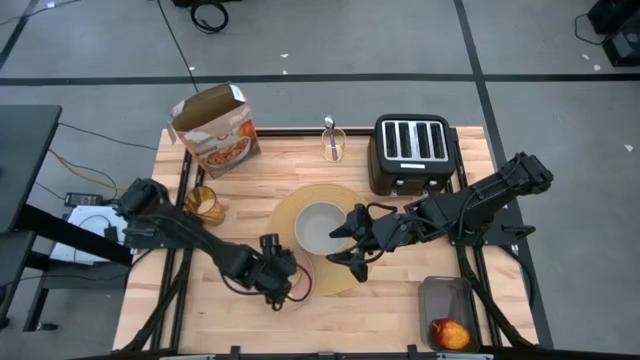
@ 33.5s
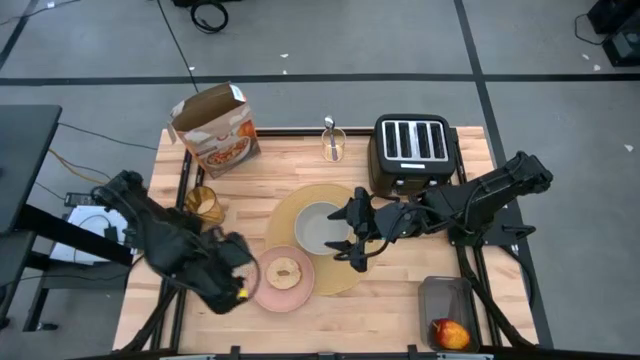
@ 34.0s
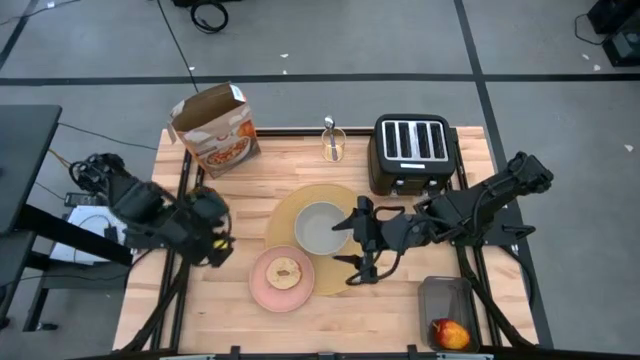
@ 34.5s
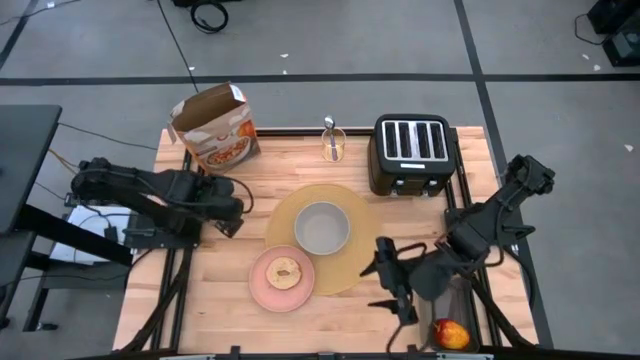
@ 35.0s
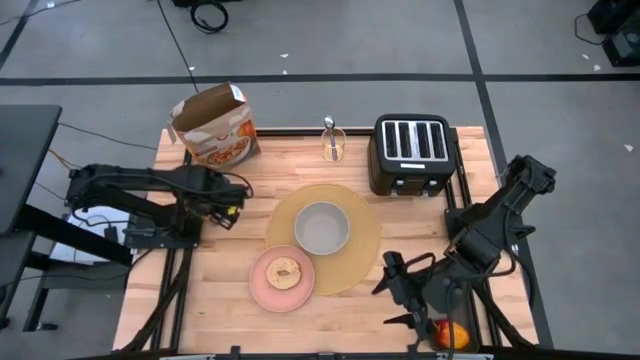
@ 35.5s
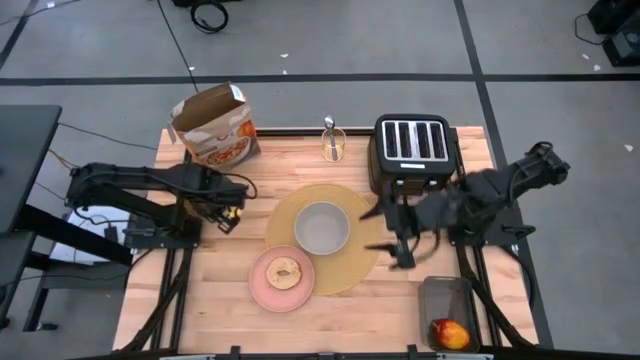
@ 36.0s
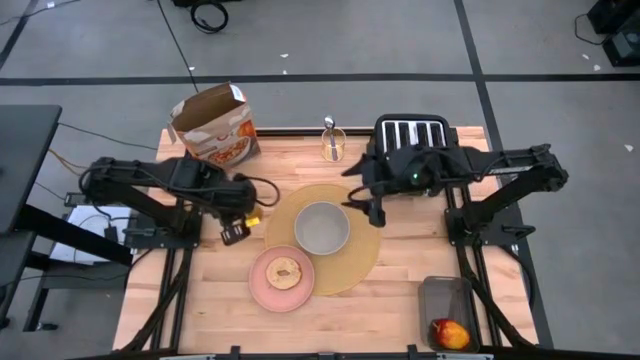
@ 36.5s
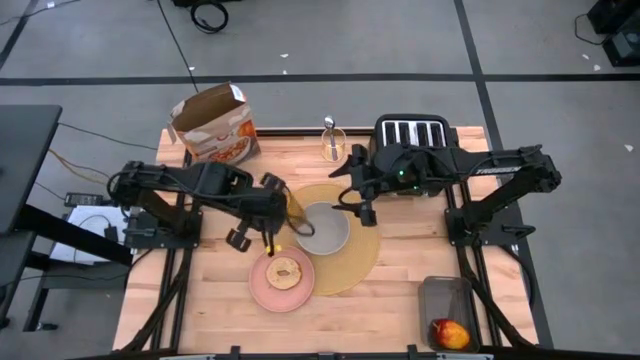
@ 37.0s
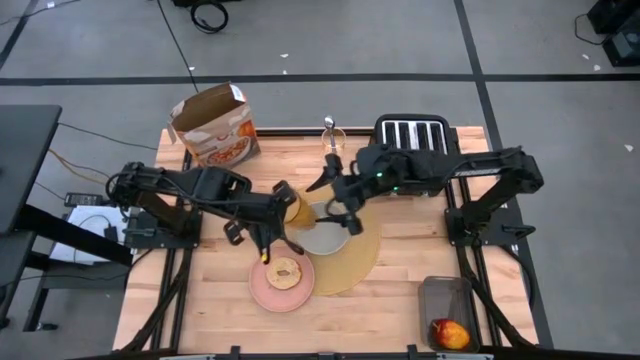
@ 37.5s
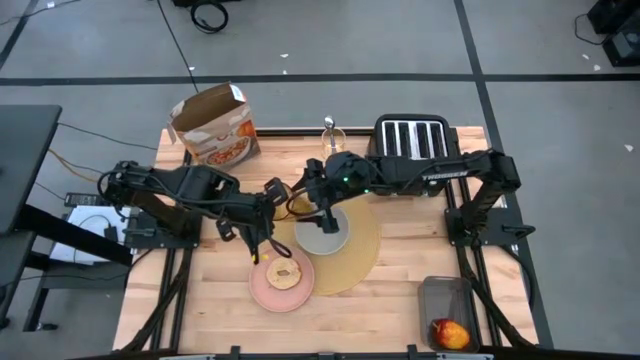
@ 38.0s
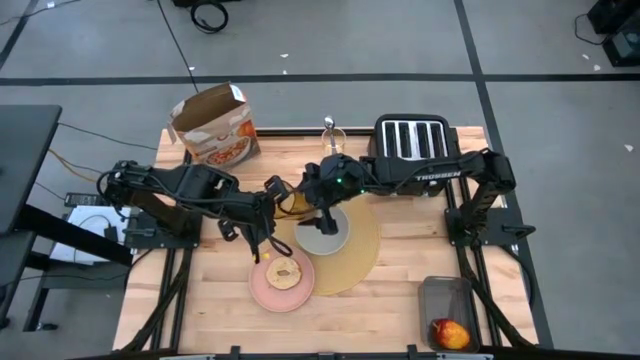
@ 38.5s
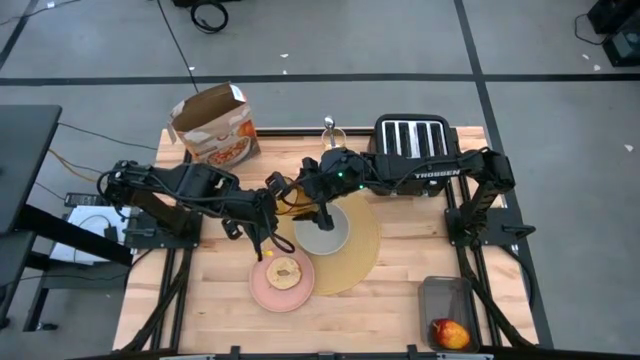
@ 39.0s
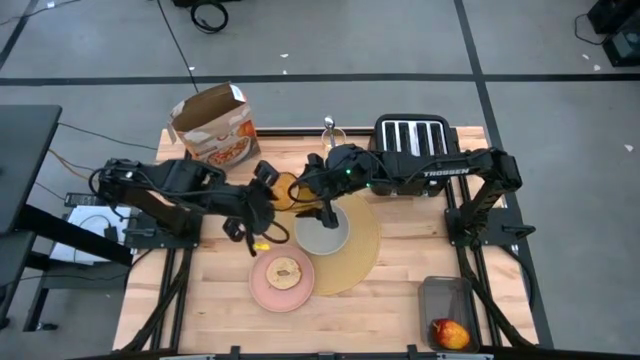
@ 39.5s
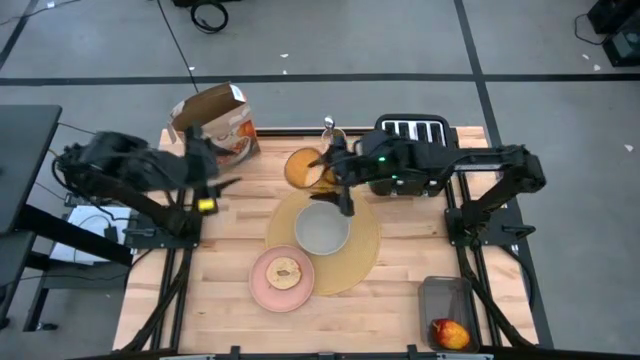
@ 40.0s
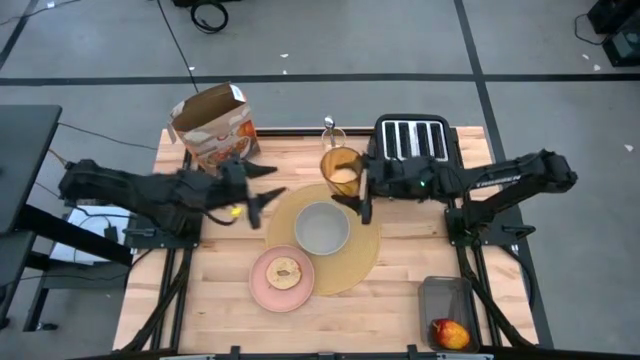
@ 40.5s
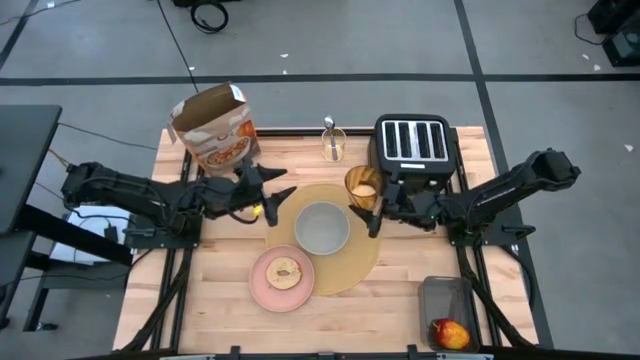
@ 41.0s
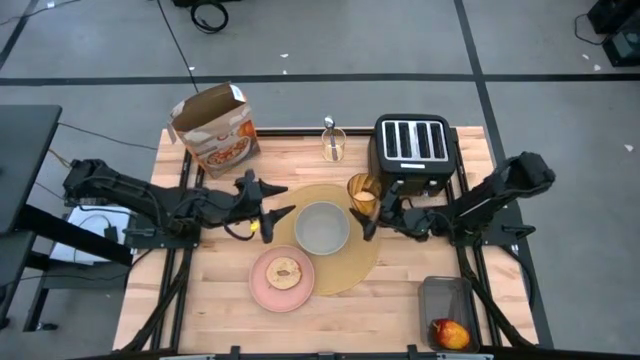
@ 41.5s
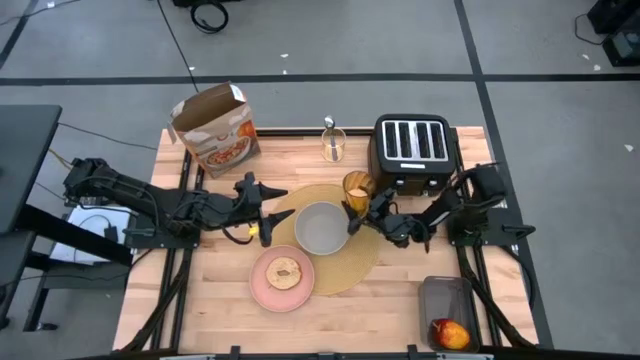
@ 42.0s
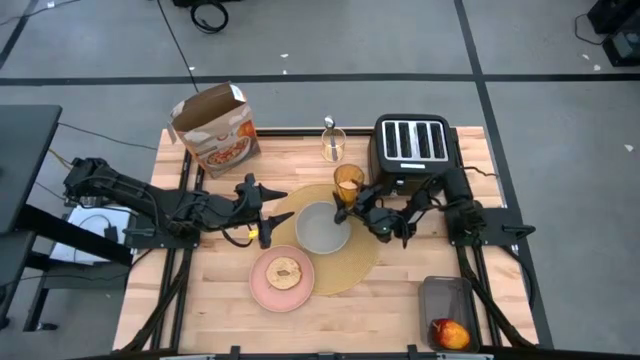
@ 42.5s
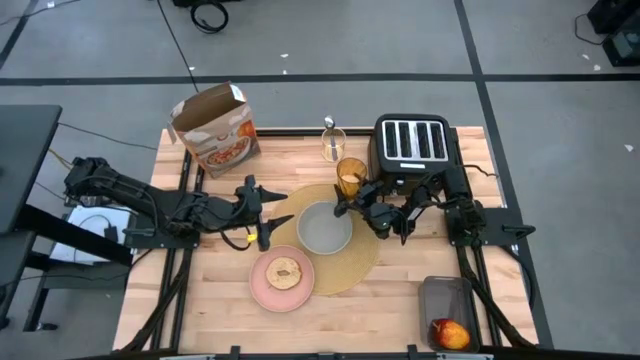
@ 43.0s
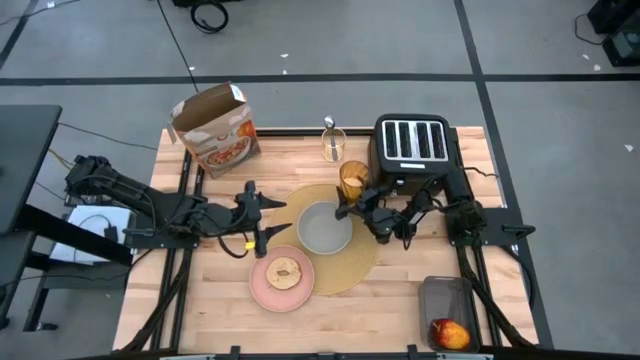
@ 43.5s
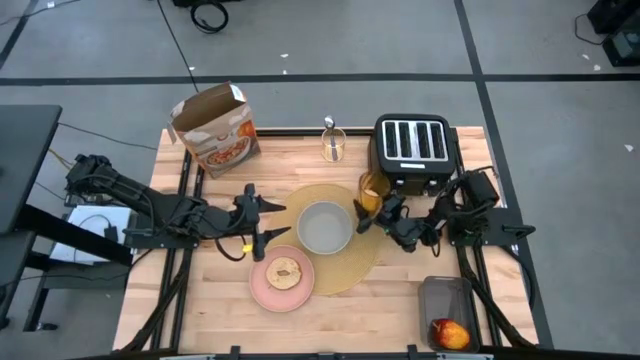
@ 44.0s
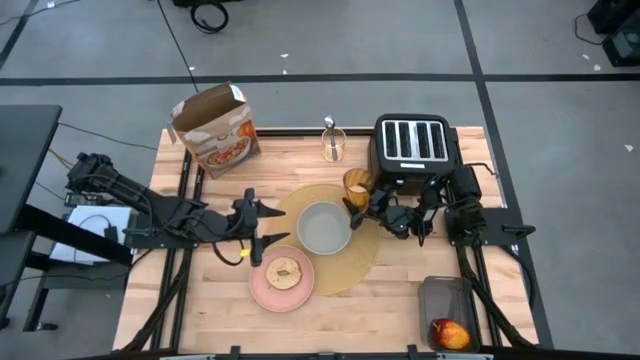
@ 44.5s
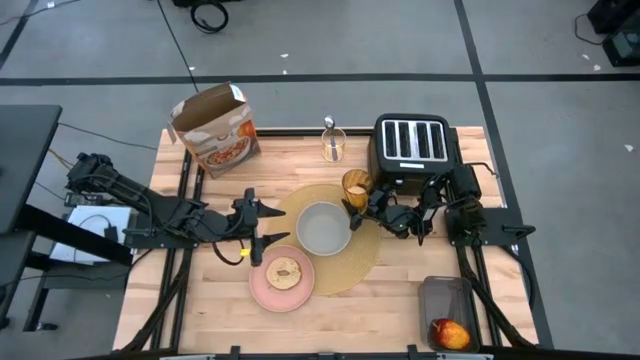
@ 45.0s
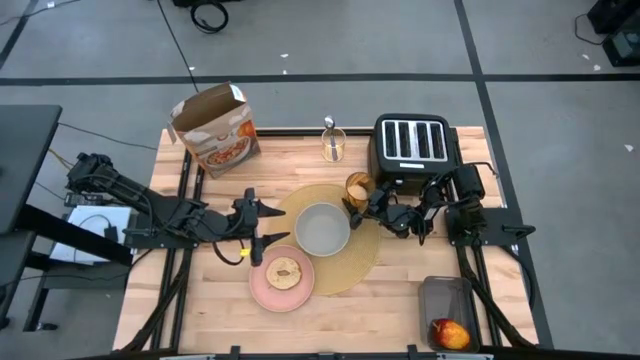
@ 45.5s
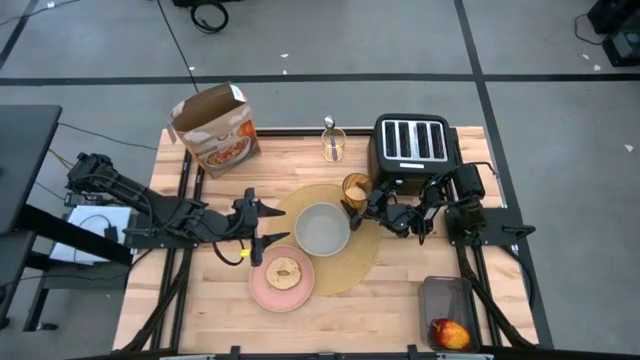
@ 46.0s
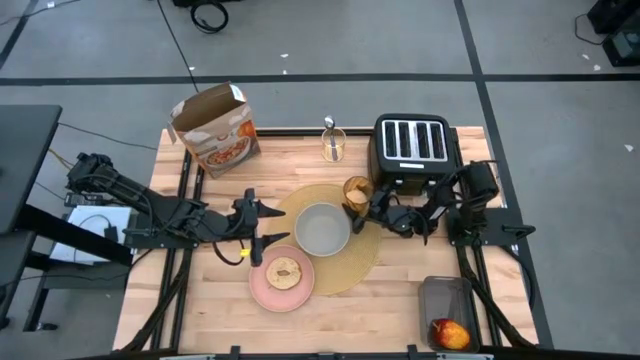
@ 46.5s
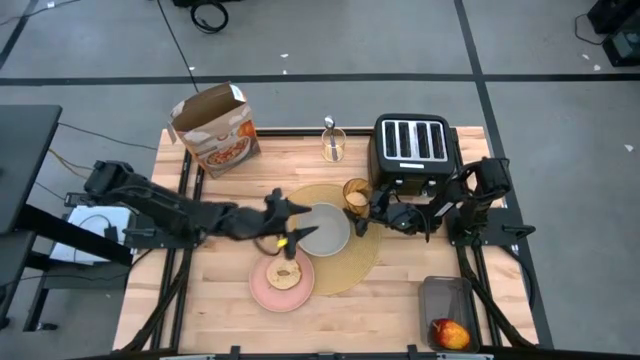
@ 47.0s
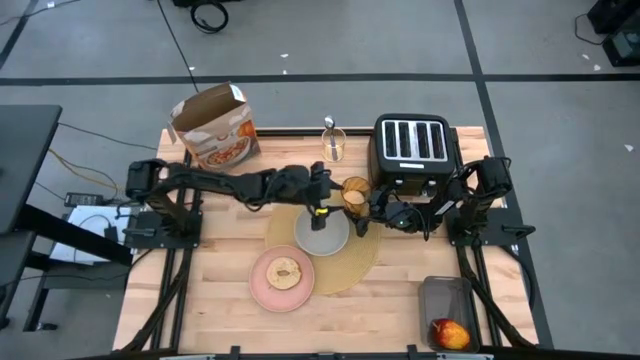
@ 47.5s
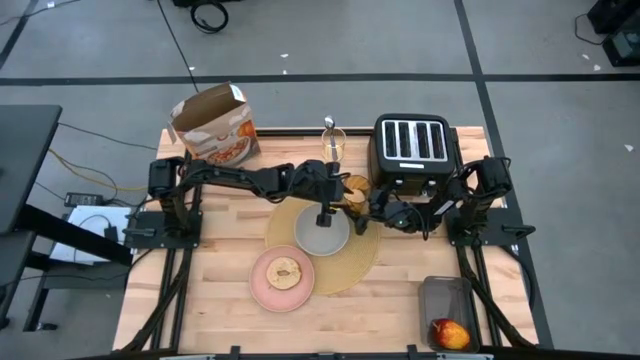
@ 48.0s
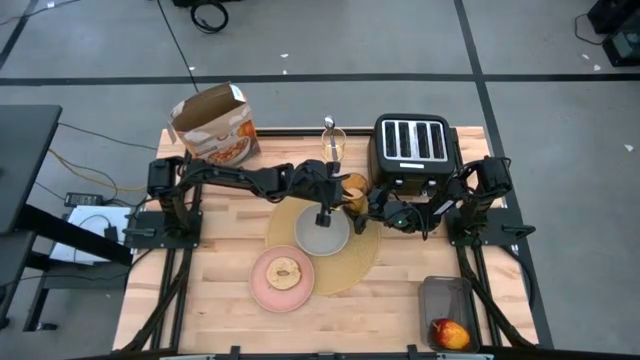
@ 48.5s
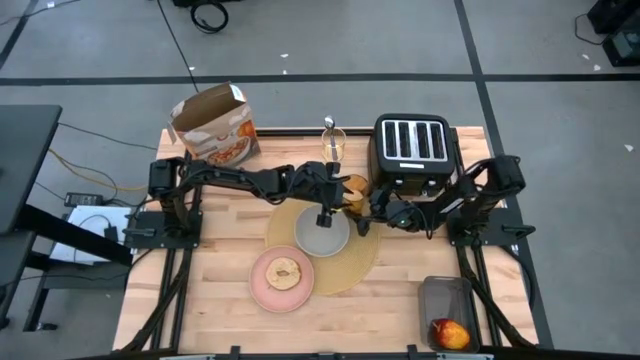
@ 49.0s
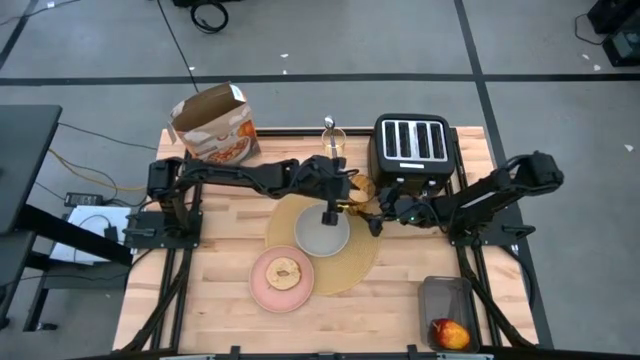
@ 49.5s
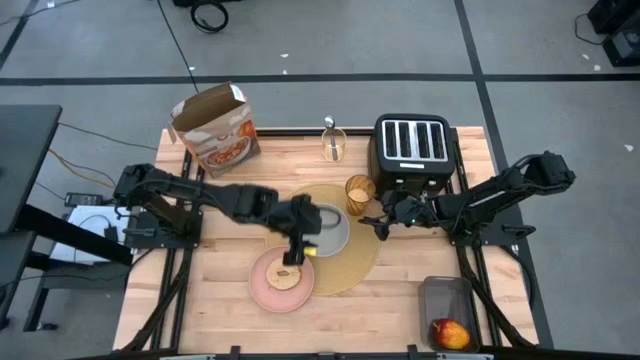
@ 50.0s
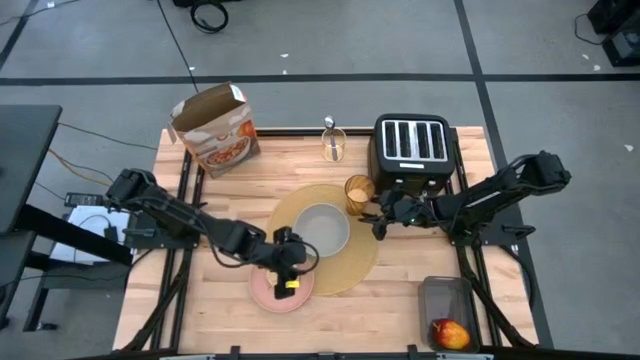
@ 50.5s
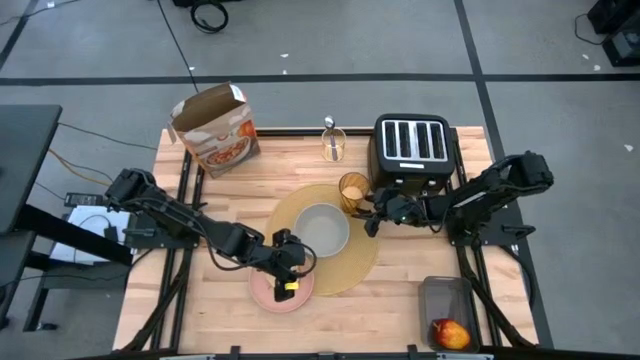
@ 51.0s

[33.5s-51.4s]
Task: Arrange a breakfast setting
Put the orange cup on the top right of the gray bowl
